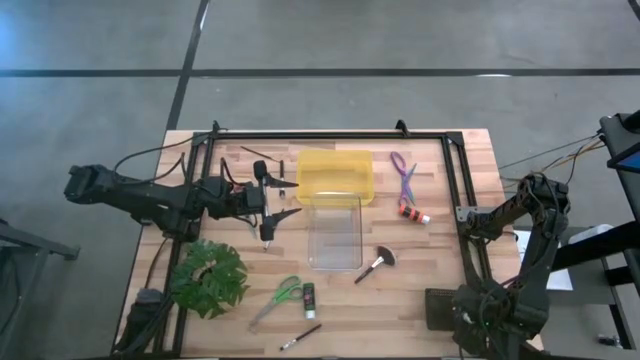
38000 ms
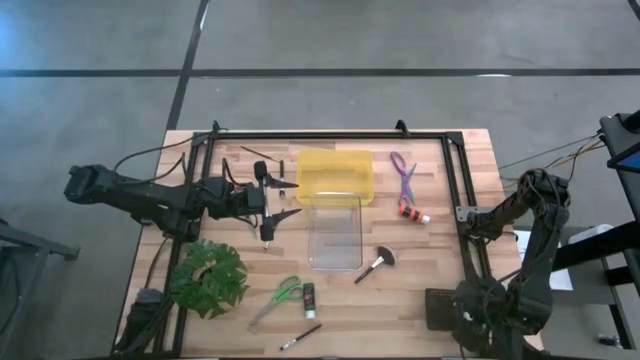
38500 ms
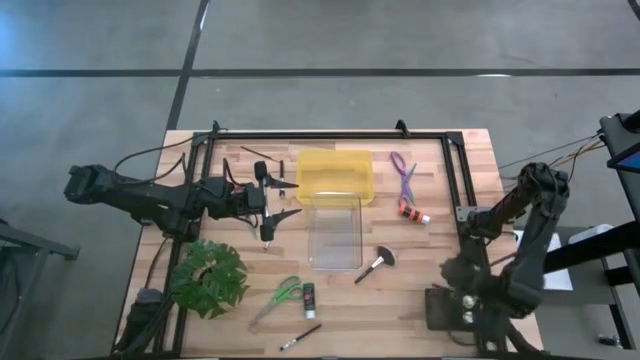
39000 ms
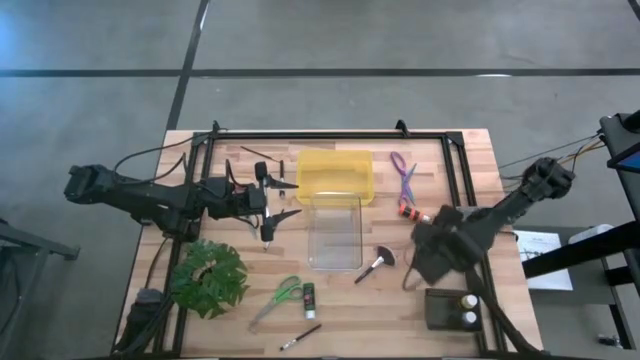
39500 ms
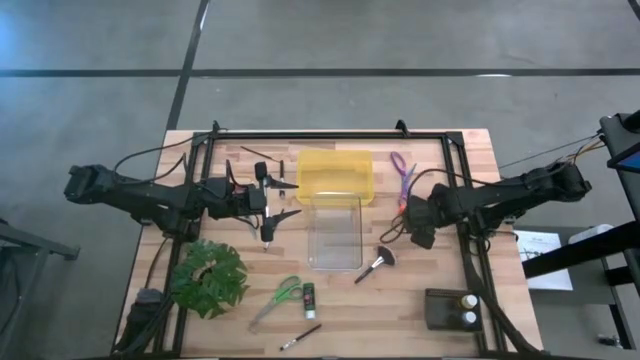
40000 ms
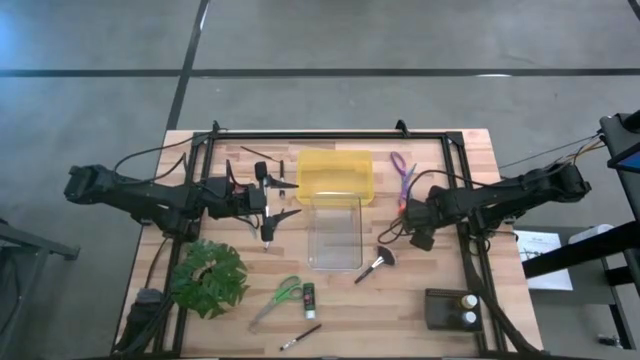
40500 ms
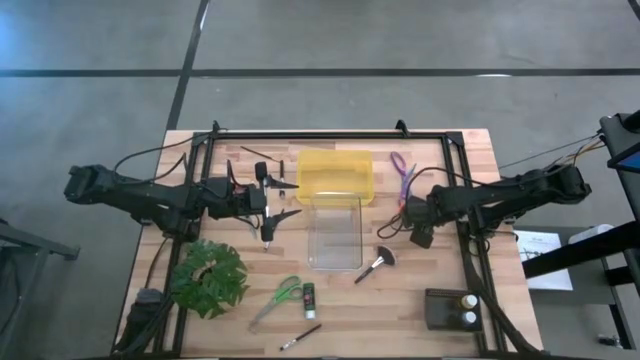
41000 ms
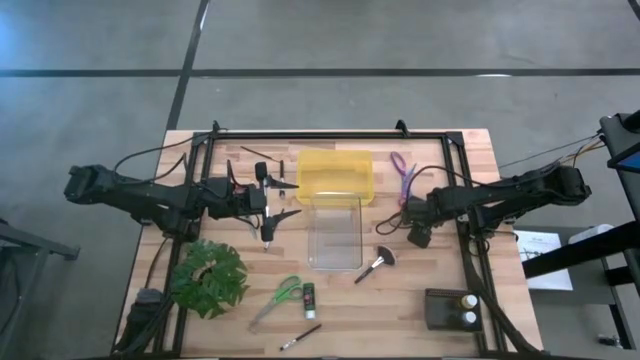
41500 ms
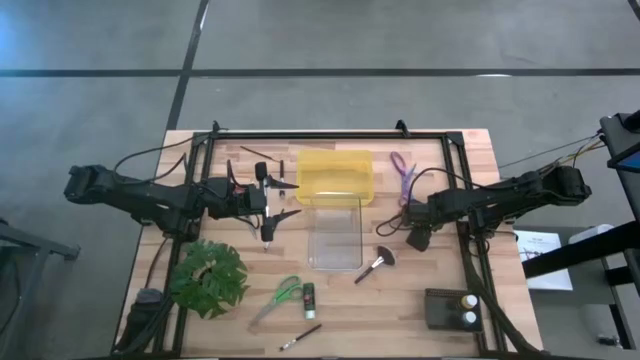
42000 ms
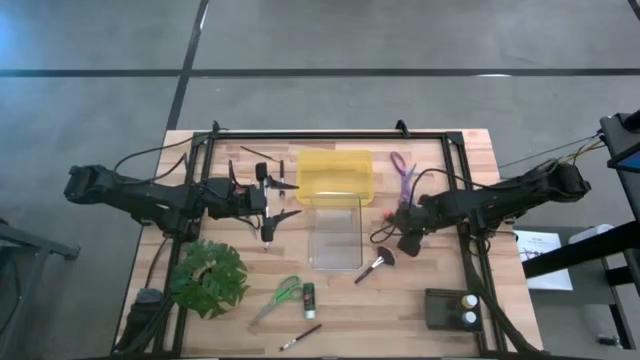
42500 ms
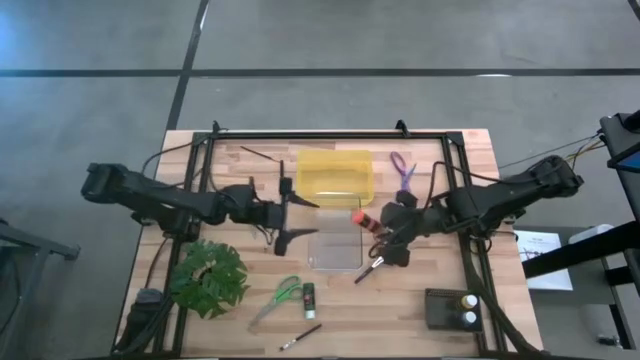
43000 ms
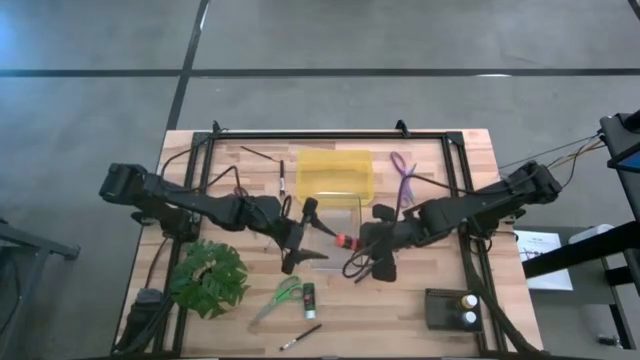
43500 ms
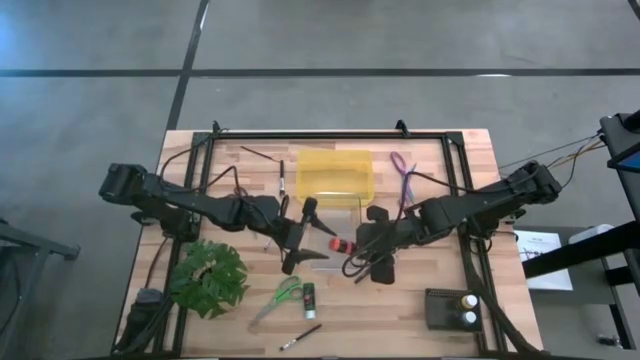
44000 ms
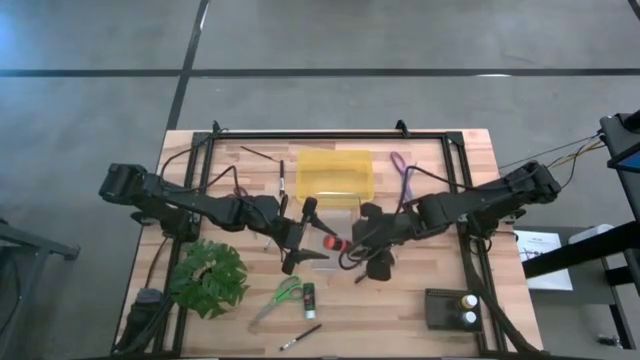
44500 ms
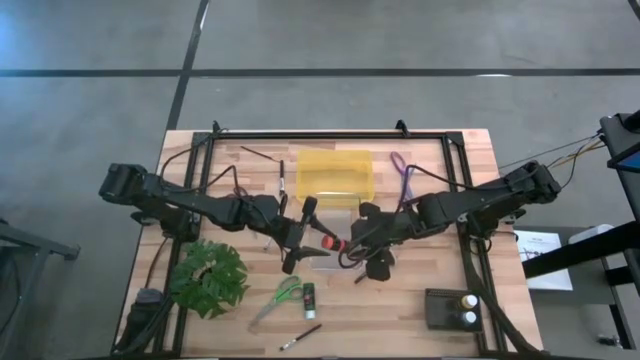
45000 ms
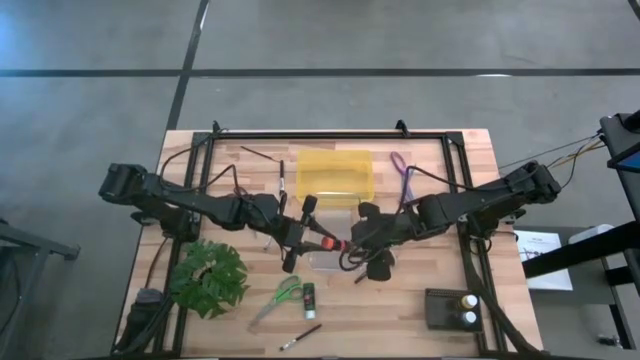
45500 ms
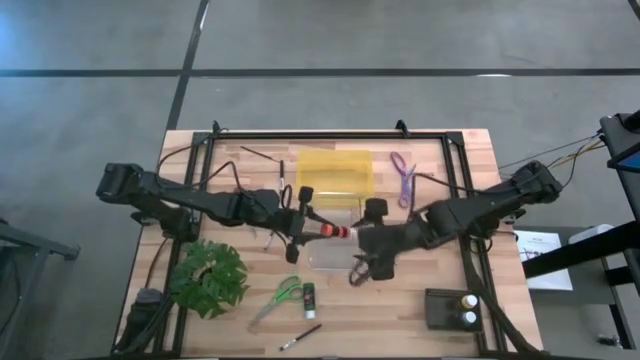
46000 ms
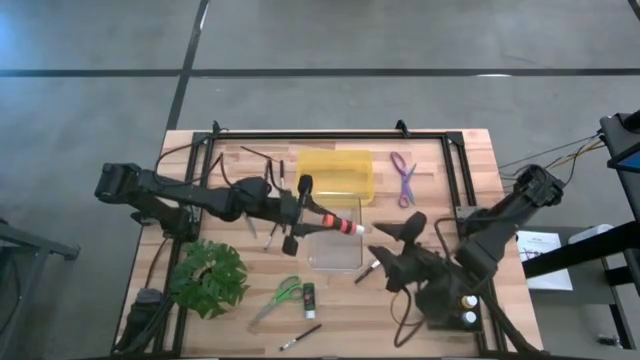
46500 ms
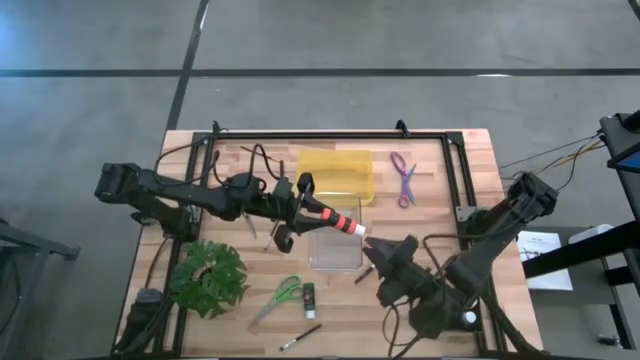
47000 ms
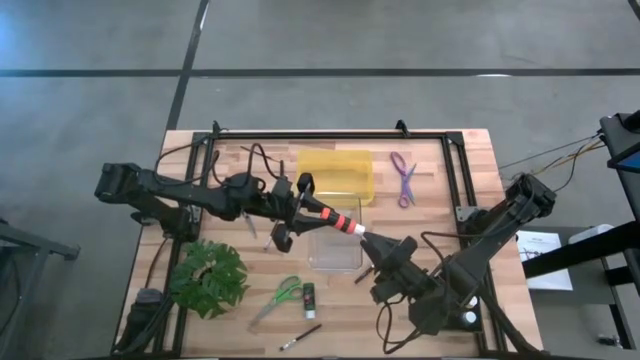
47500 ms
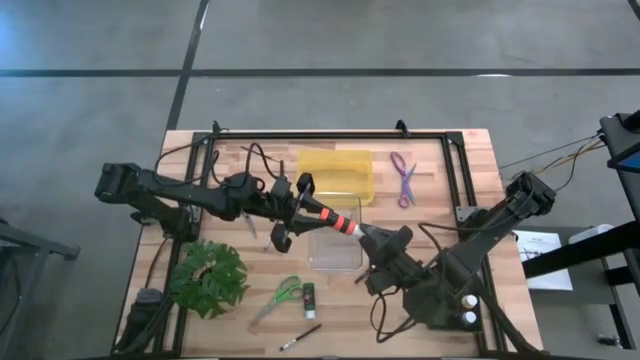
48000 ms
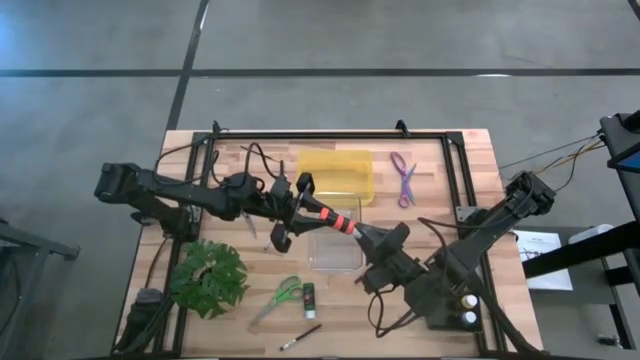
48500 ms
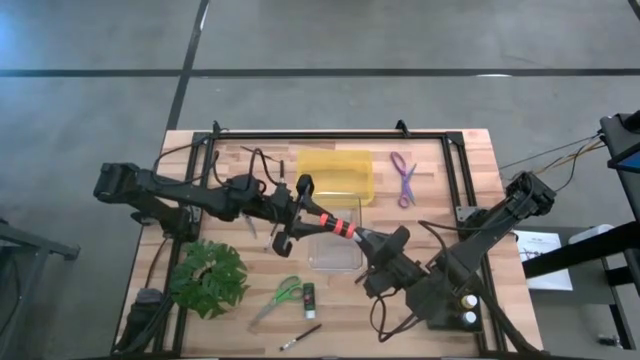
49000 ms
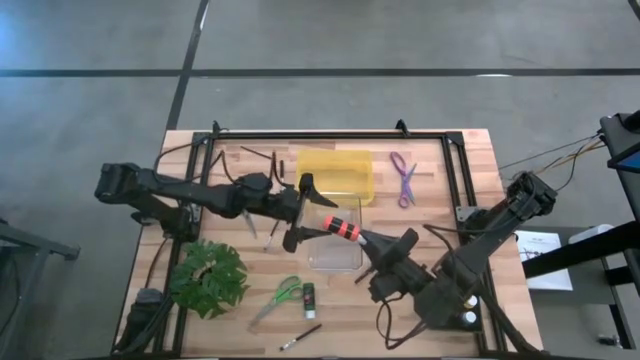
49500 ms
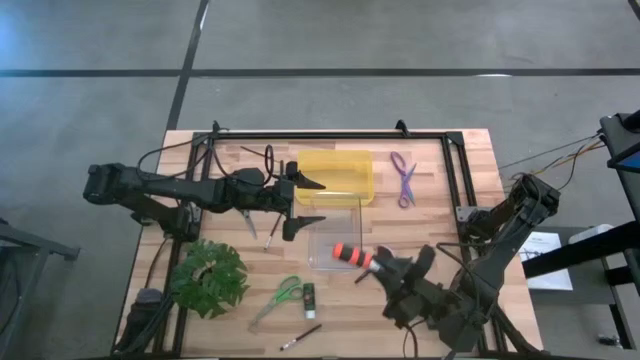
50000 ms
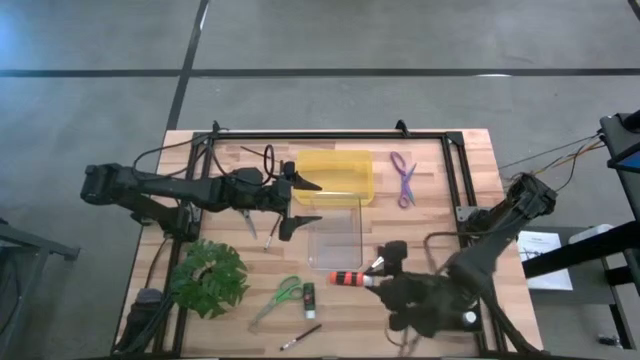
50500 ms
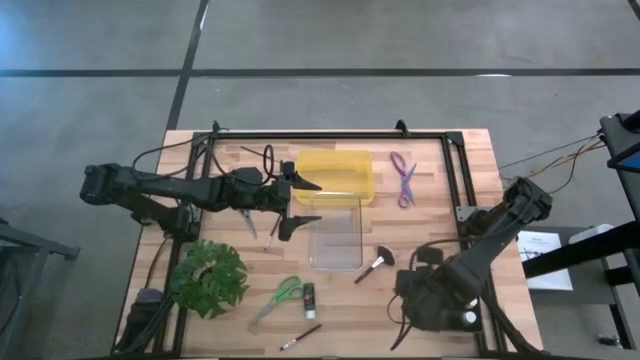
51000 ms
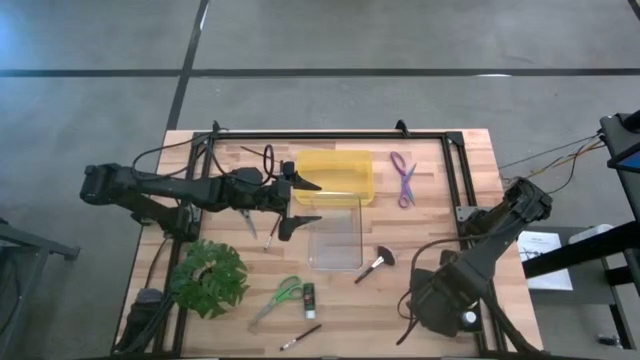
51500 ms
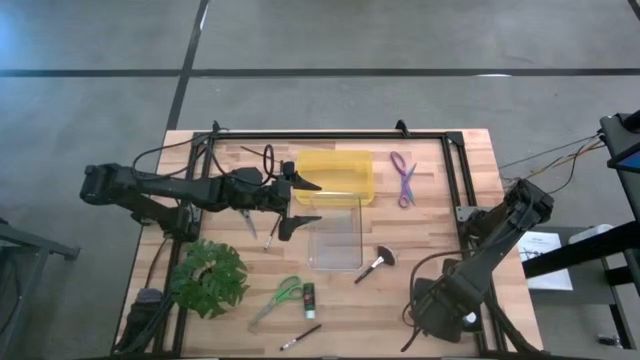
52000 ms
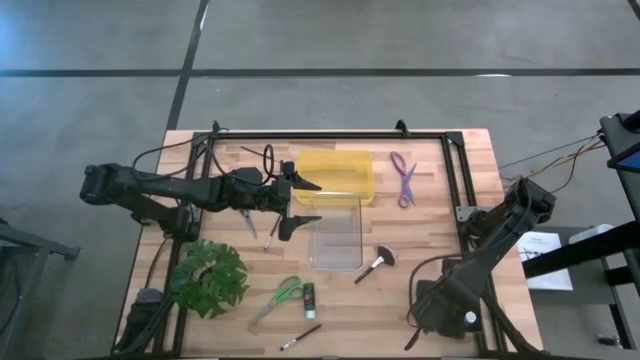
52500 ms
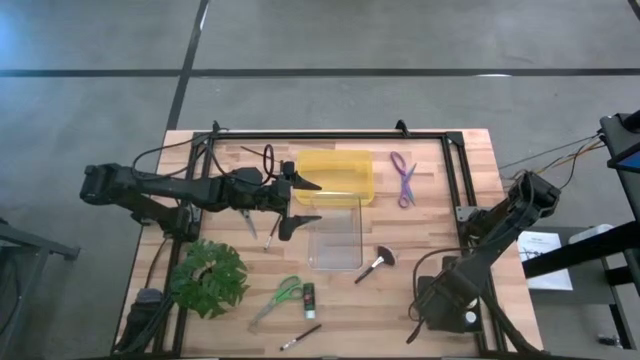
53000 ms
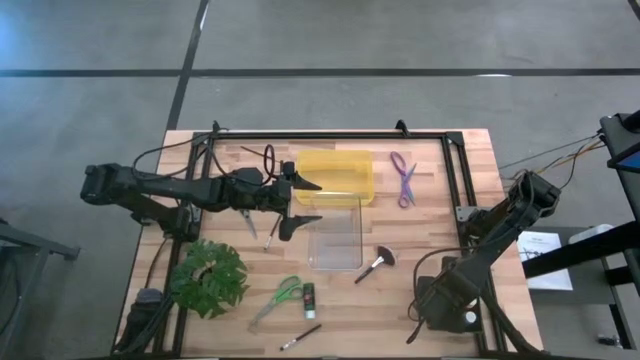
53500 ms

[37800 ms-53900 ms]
Task: Pick & Place Paint Supplies
Put the orange paint bottle into the black bin
